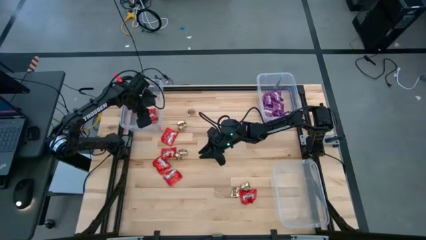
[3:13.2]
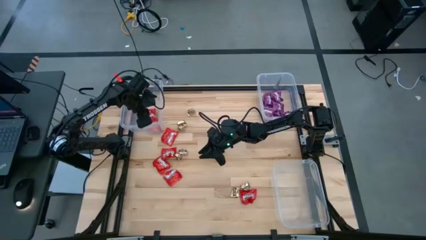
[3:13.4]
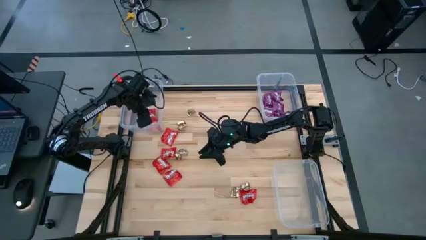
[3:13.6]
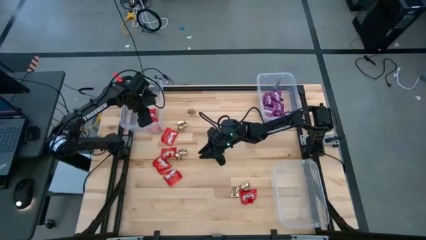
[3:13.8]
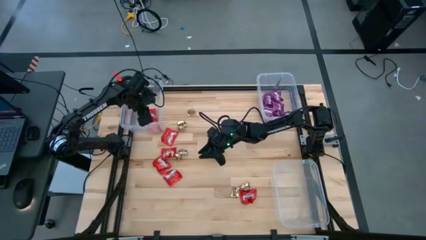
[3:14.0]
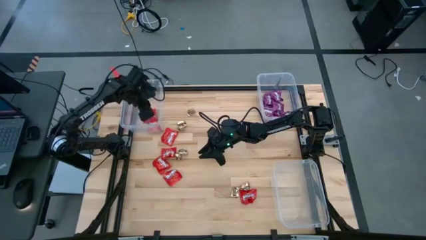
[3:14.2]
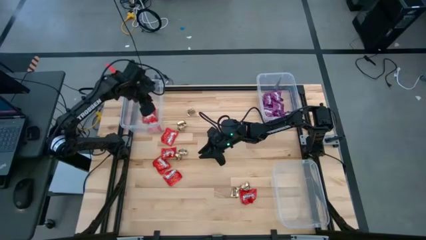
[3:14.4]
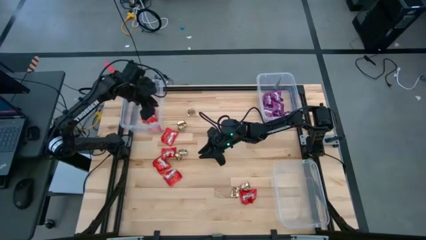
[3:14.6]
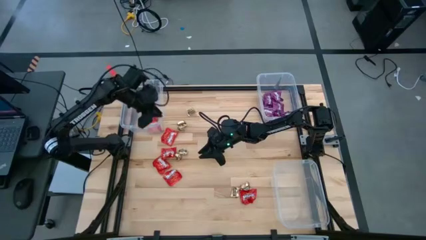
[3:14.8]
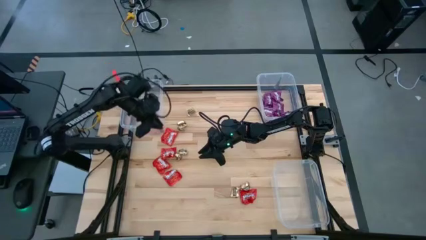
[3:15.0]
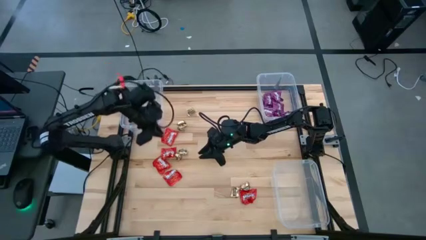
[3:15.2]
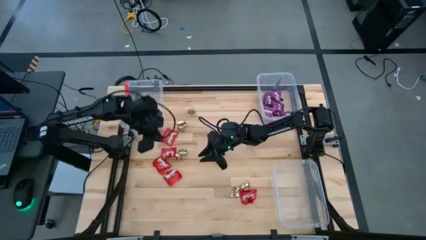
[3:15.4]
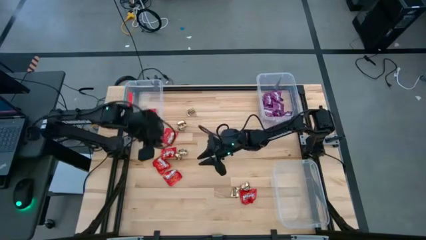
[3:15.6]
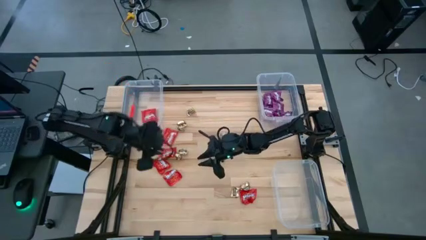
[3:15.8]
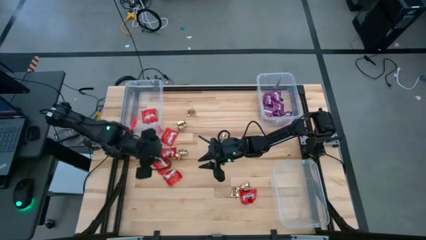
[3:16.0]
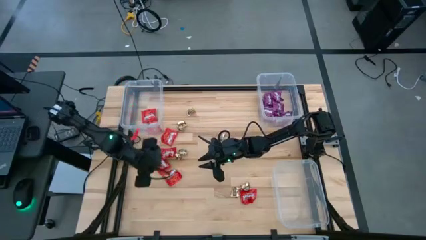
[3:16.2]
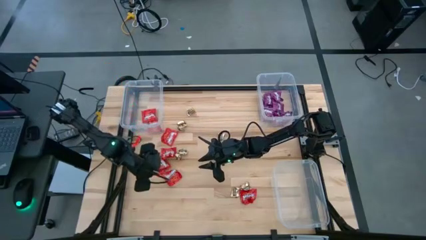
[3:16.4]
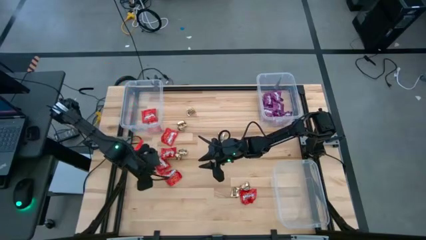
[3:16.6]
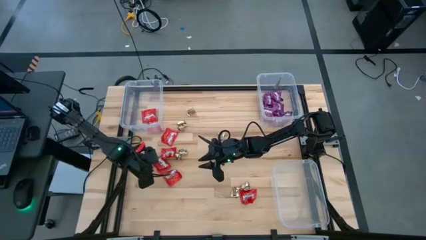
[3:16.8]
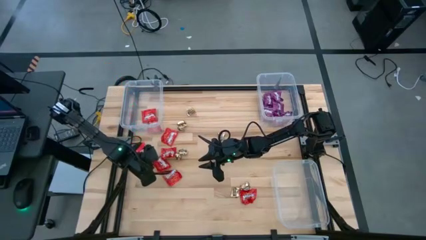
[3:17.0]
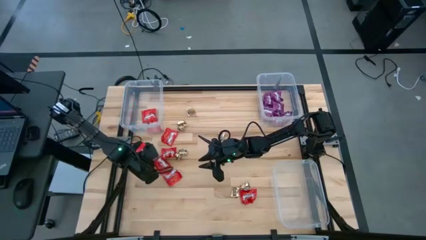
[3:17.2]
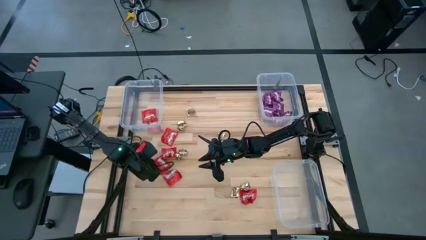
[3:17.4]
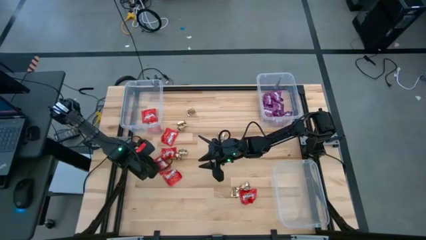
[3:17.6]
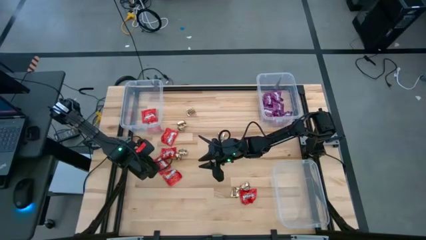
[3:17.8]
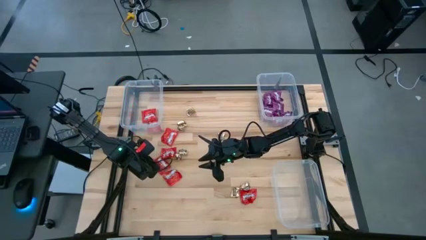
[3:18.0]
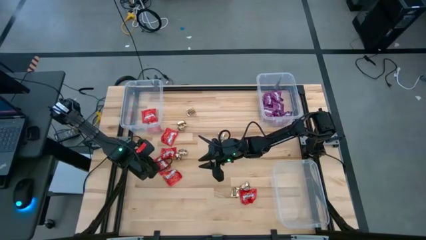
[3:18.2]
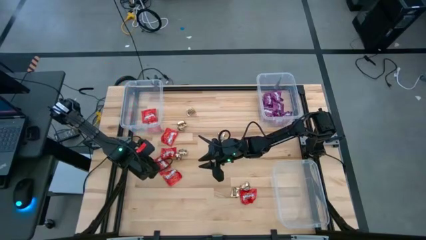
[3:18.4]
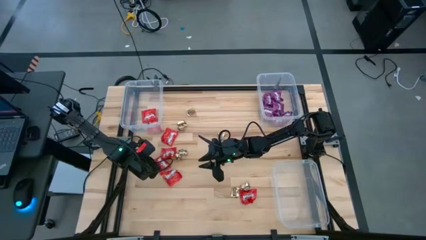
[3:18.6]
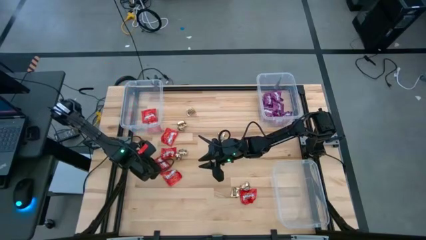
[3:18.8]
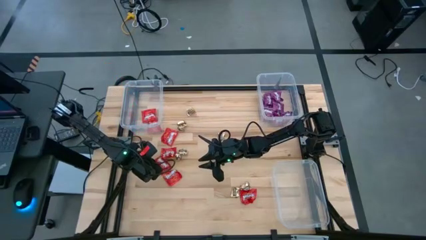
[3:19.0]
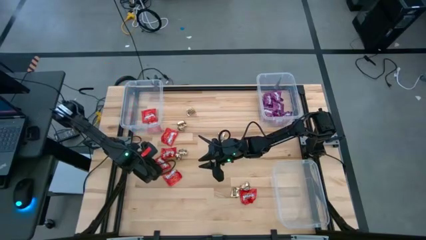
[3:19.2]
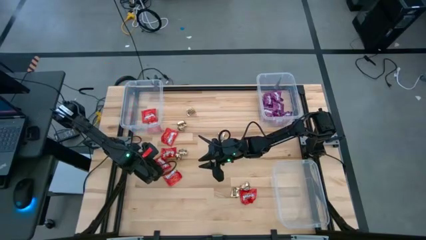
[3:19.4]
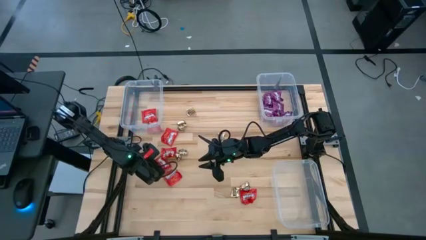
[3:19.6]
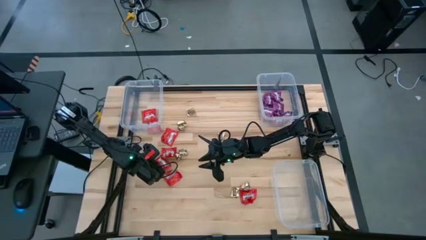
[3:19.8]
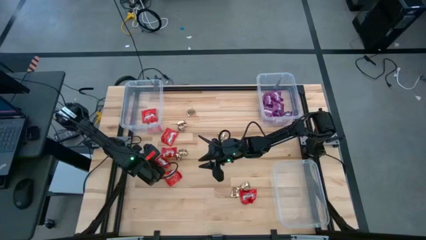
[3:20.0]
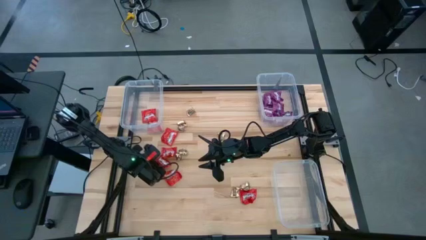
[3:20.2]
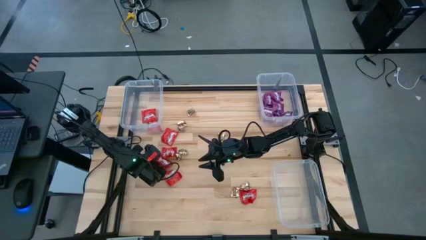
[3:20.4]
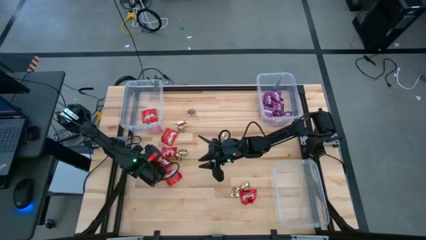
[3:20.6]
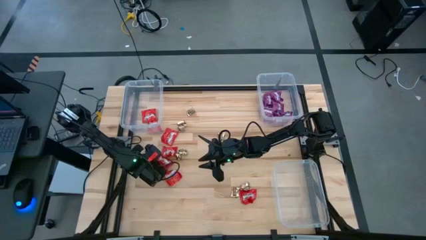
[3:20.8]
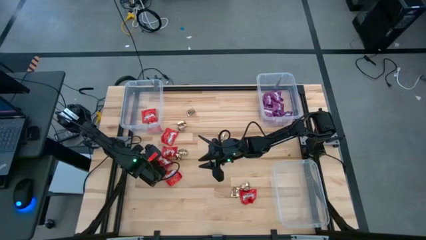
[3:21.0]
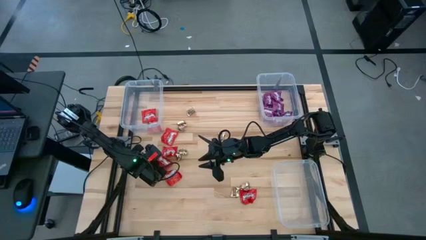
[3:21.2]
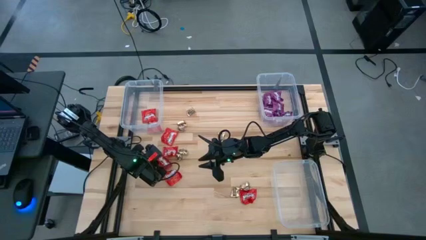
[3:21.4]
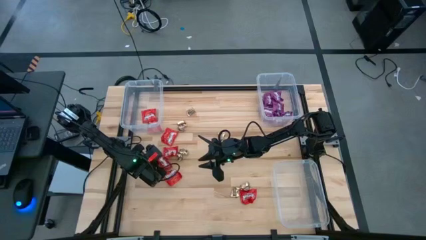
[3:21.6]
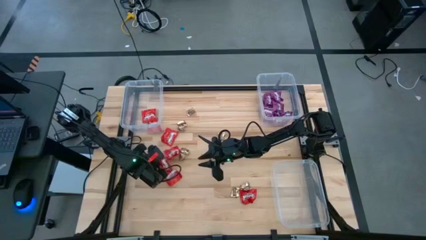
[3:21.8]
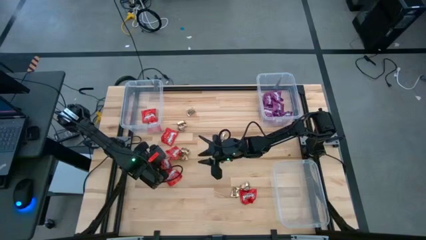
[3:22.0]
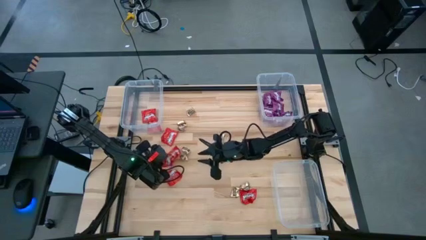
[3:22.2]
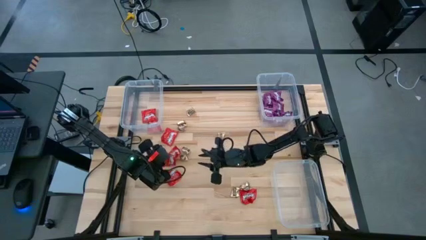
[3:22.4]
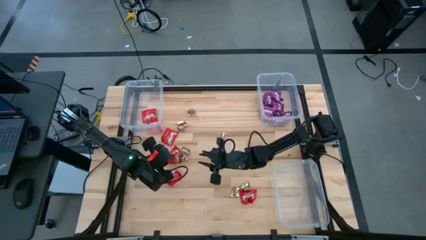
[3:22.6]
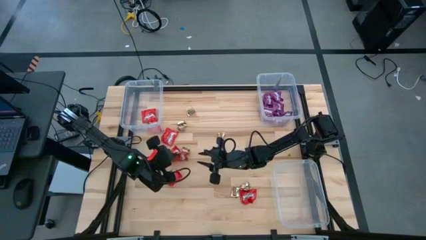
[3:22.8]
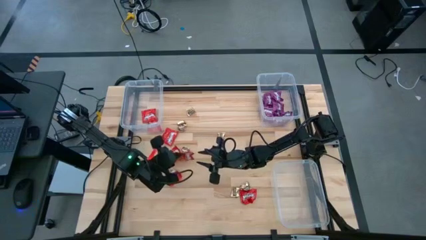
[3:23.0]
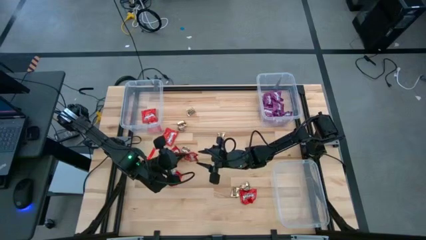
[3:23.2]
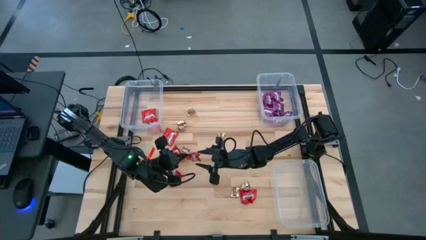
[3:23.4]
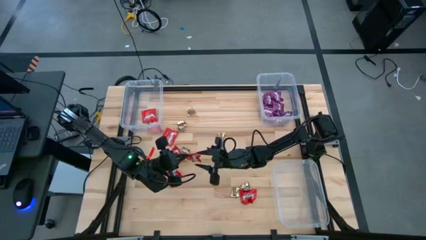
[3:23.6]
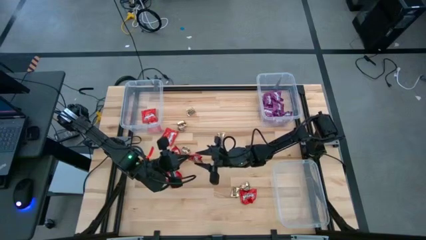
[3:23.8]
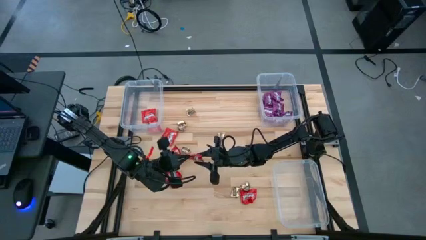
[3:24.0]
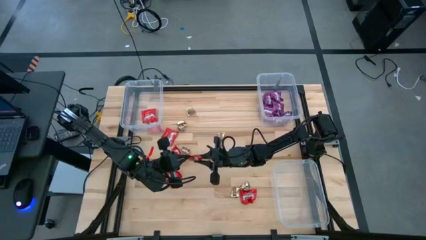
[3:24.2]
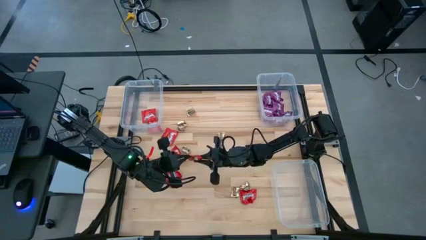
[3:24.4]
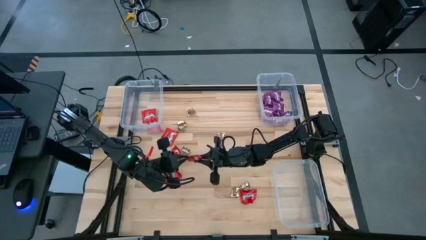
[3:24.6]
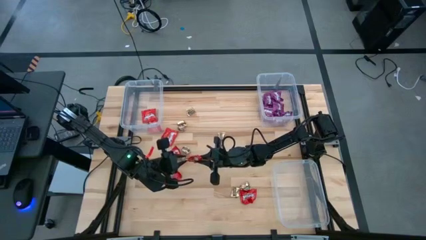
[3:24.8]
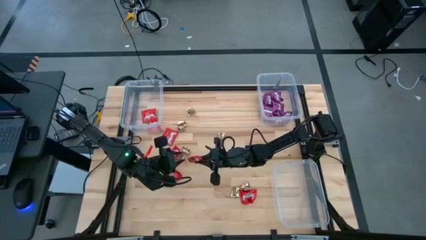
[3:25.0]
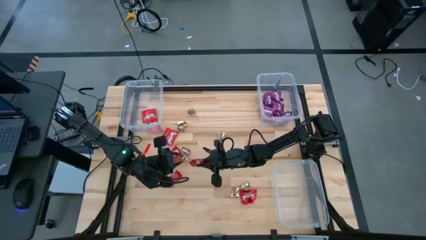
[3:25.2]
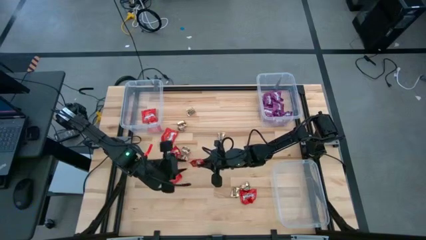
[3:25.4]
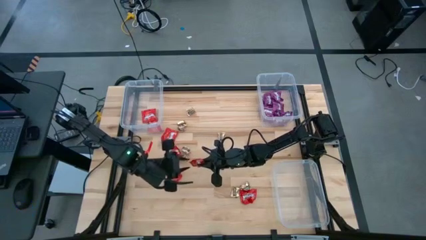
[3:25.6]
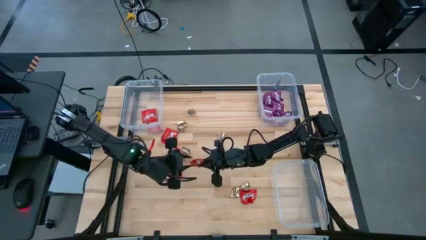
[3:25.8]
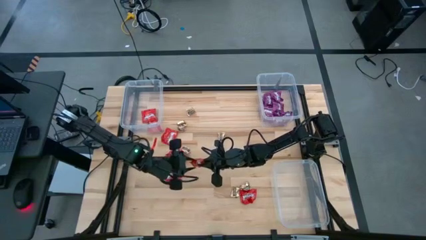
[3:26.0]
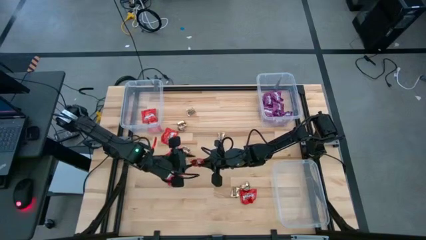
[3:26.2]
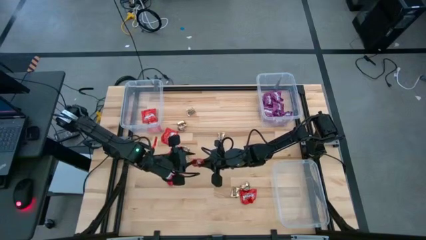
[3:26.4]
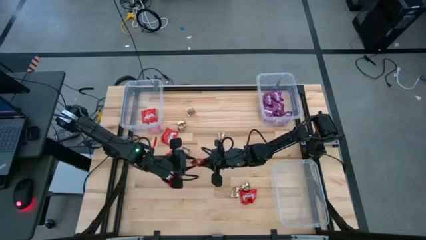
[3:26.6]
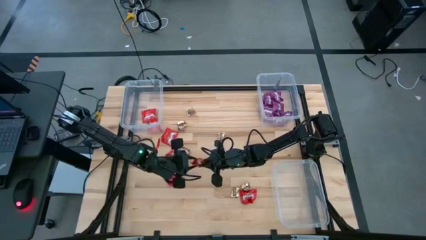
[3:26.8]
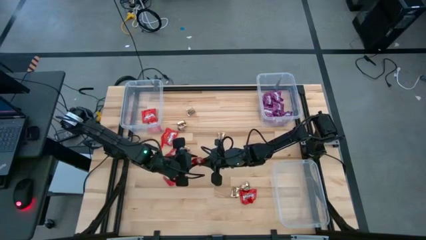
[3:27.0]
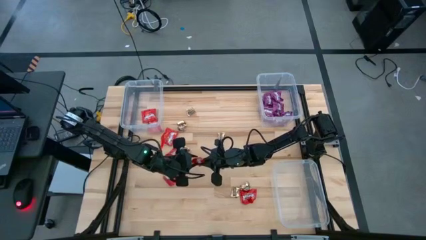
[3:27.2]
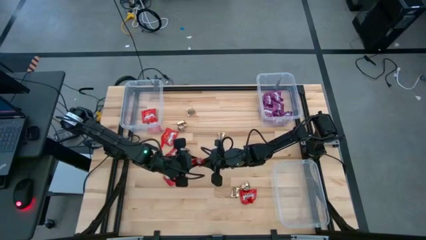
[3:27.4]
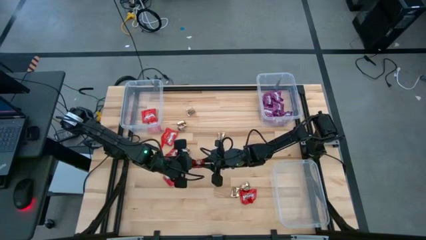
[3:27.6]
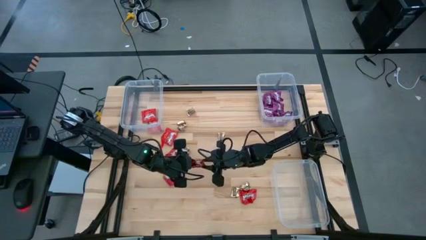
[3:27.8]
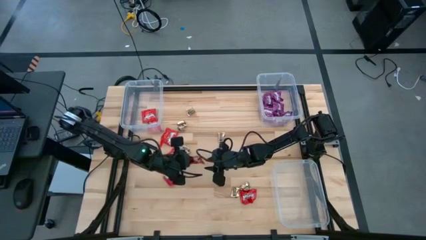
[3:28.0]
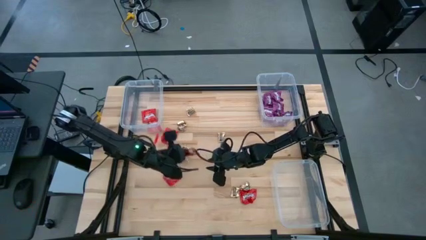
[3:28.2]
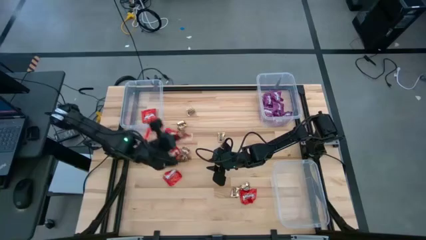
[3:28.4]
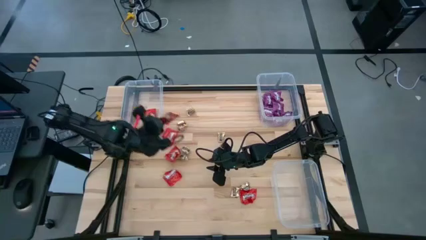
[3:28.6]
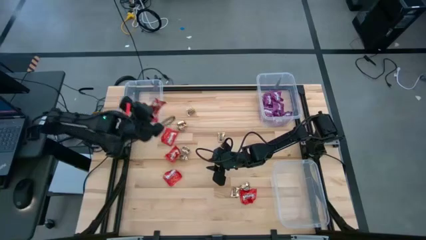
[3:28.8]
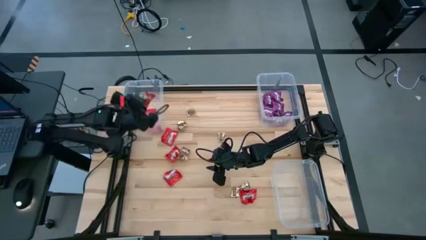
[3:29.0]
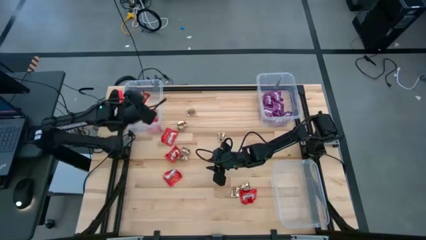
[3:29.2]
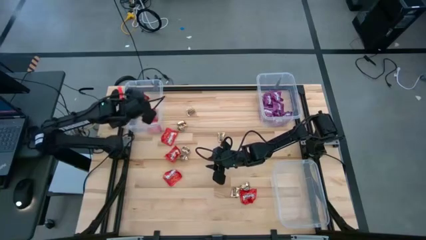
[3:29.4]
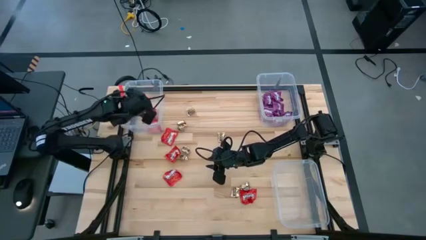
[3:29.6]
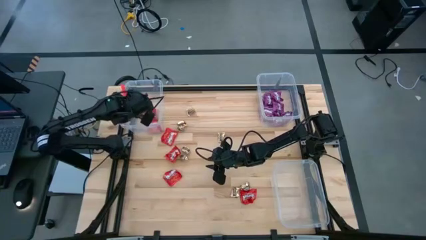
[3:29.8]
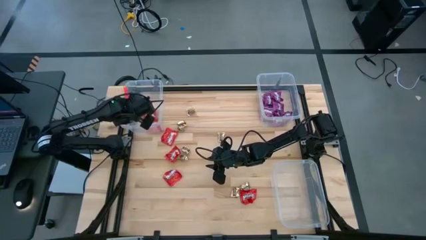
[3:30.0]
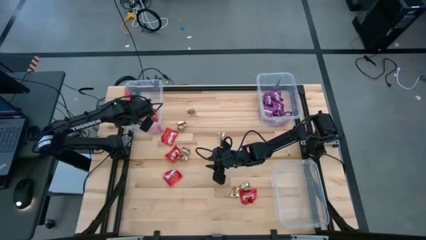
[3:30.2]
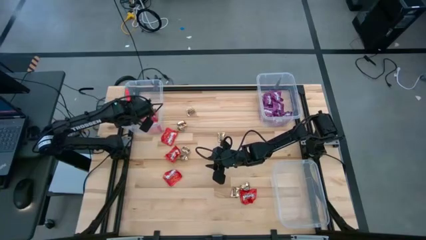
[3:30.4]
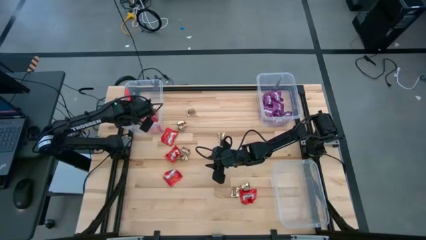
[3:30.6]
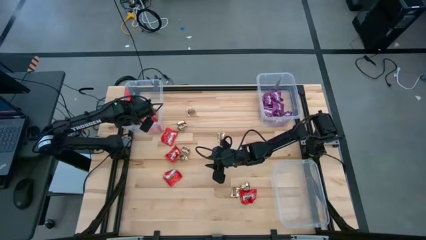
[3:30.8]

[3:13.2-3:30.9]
Task: Sort candy
Put the red candy into the top left transparent bin
